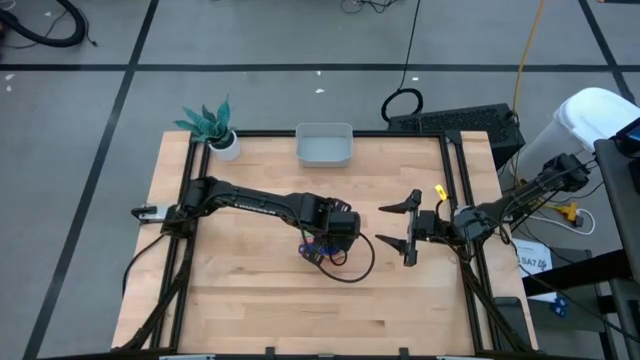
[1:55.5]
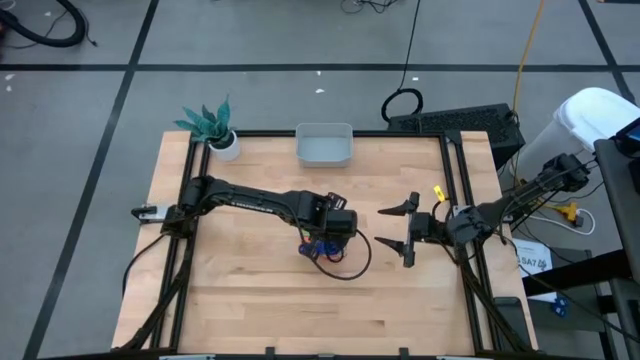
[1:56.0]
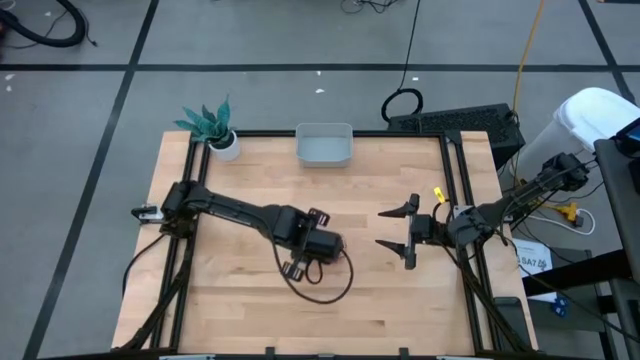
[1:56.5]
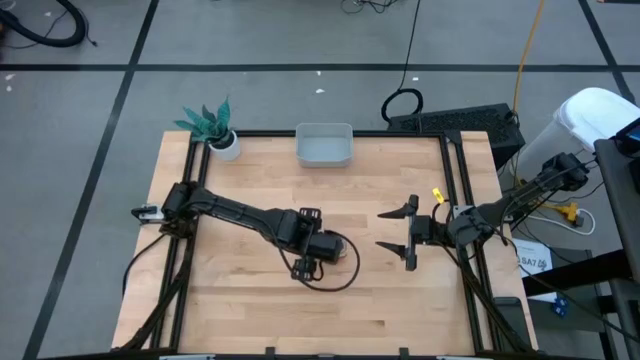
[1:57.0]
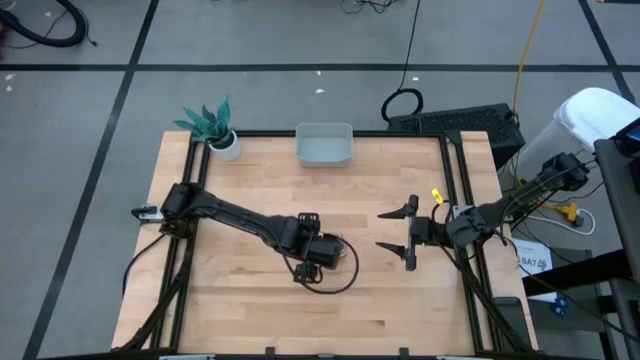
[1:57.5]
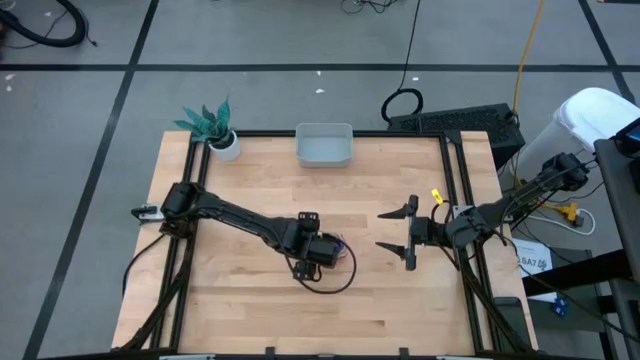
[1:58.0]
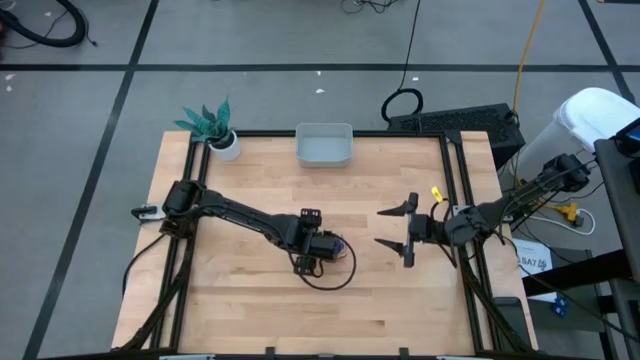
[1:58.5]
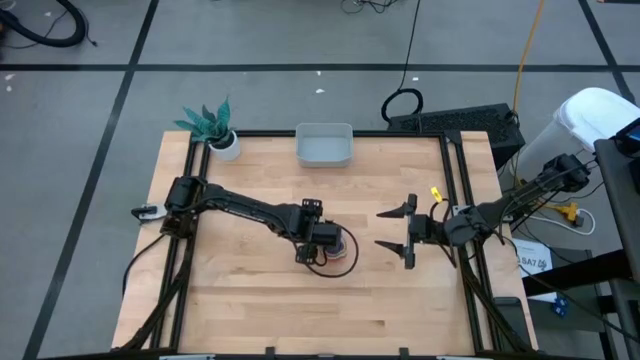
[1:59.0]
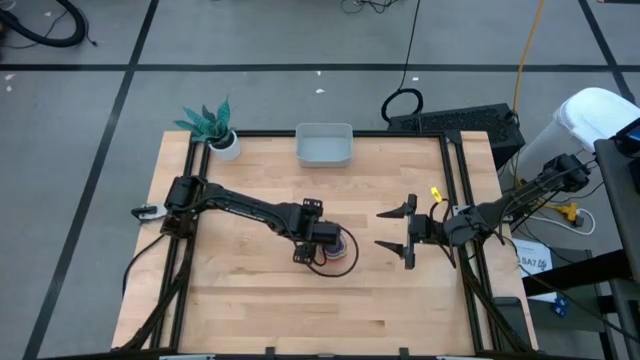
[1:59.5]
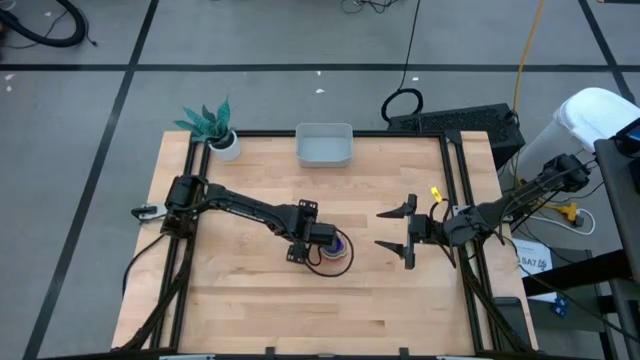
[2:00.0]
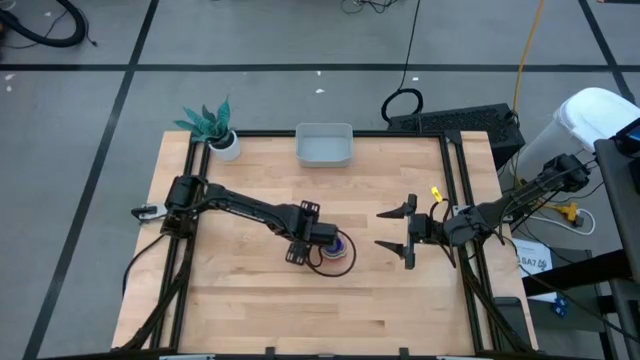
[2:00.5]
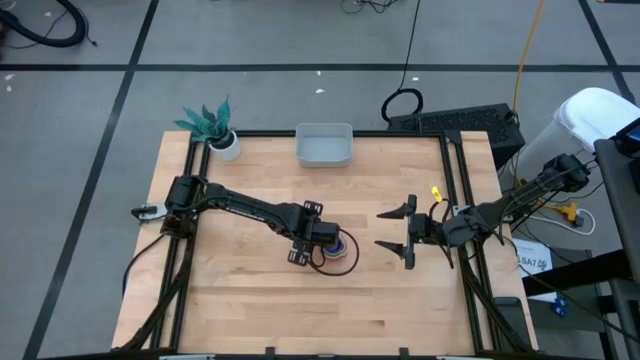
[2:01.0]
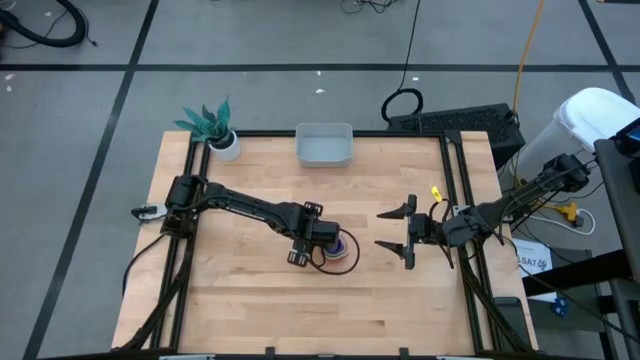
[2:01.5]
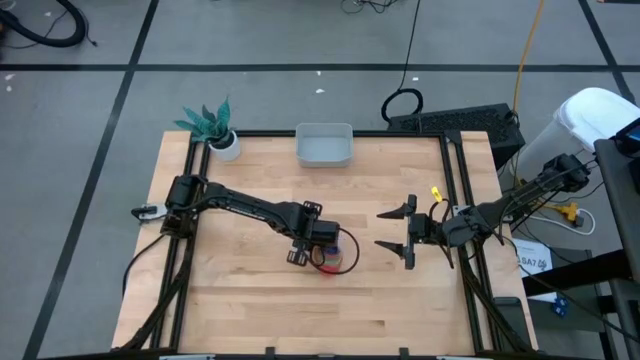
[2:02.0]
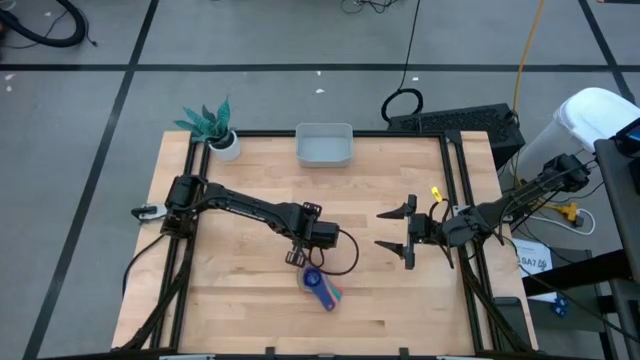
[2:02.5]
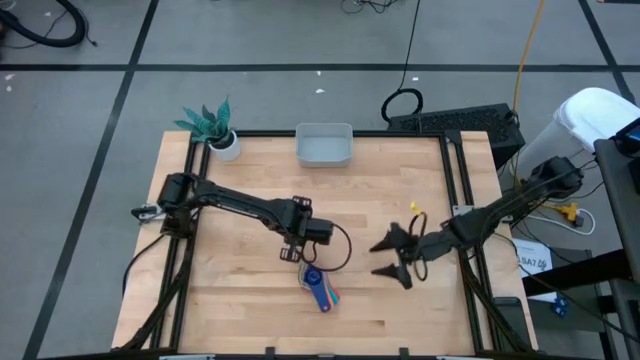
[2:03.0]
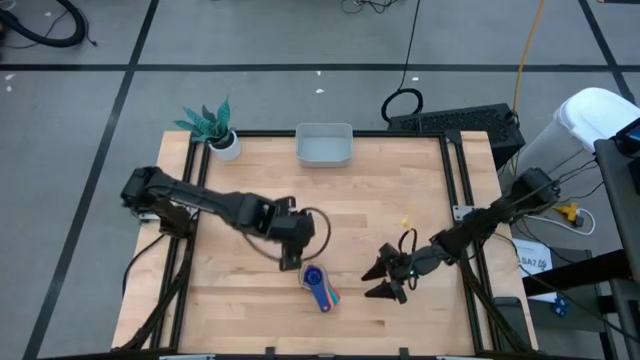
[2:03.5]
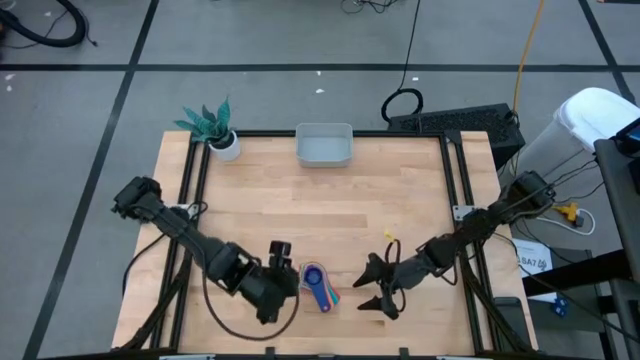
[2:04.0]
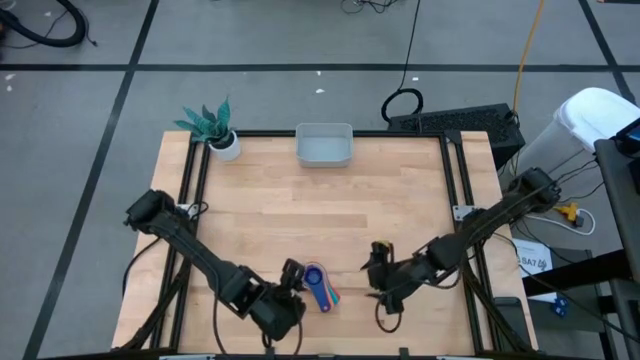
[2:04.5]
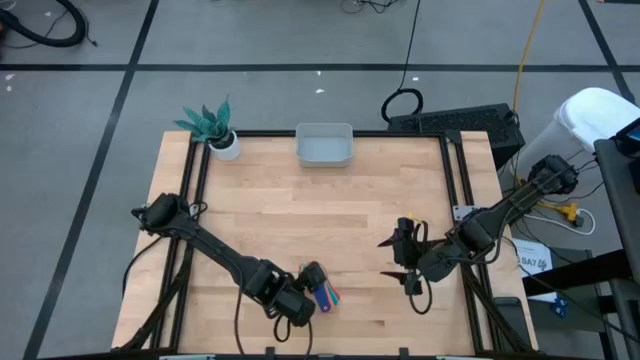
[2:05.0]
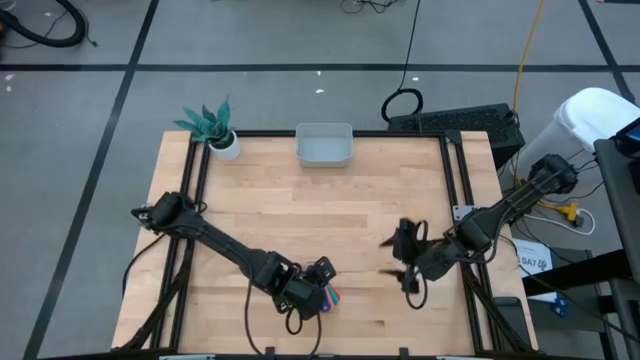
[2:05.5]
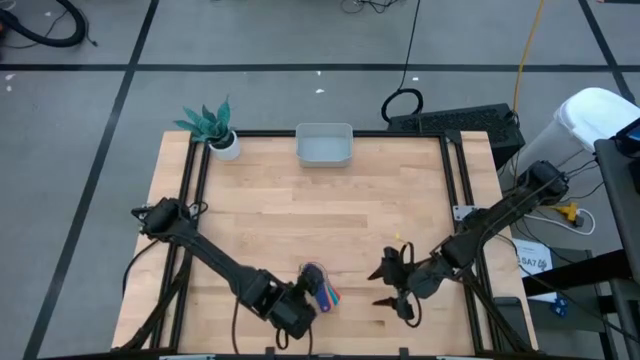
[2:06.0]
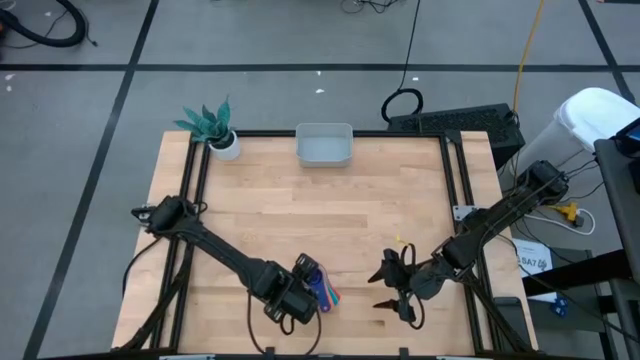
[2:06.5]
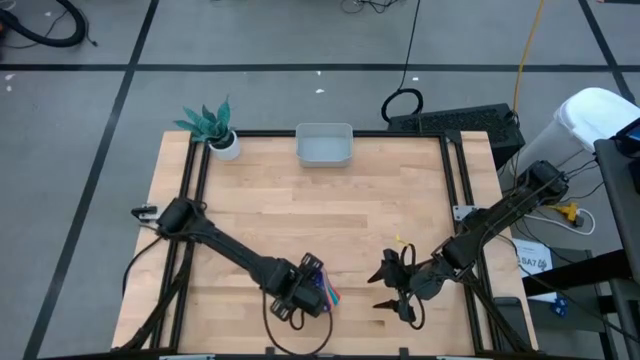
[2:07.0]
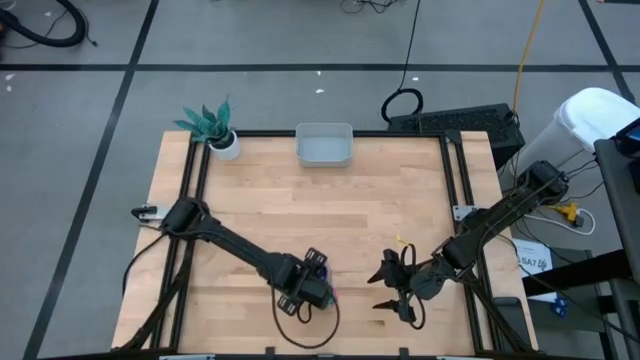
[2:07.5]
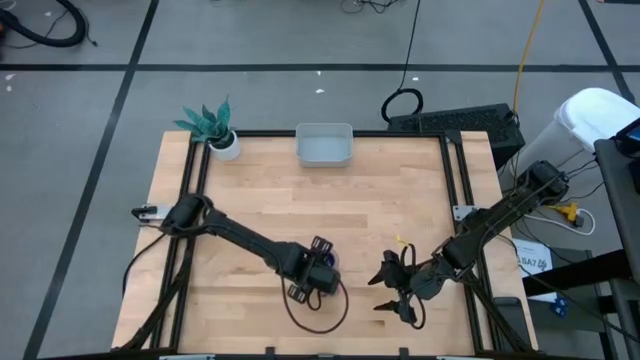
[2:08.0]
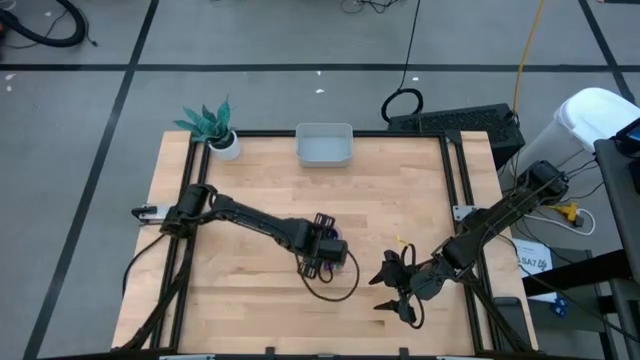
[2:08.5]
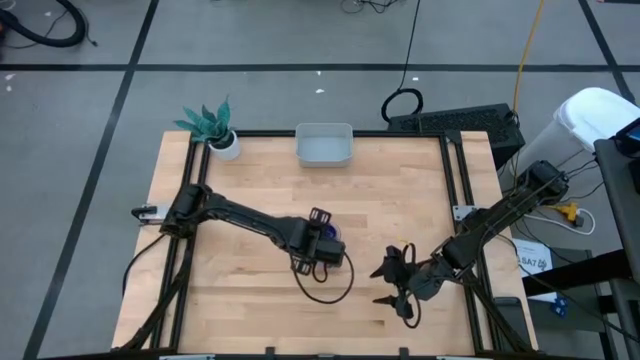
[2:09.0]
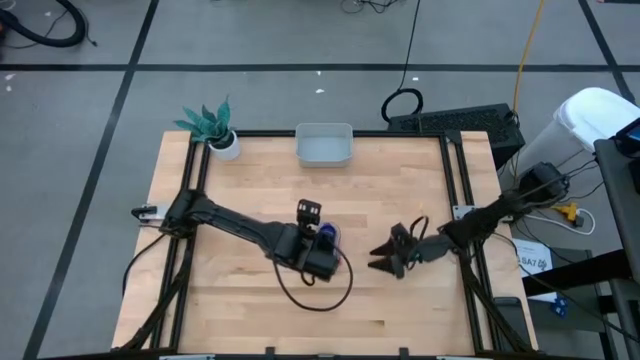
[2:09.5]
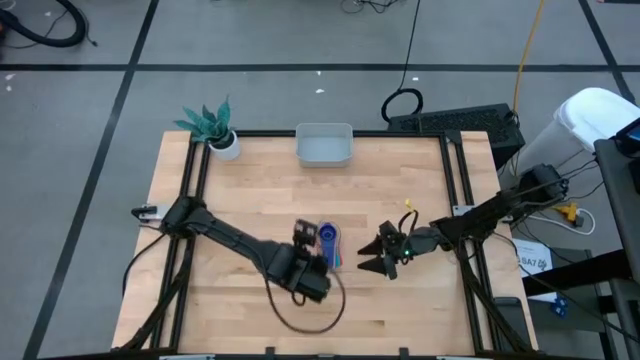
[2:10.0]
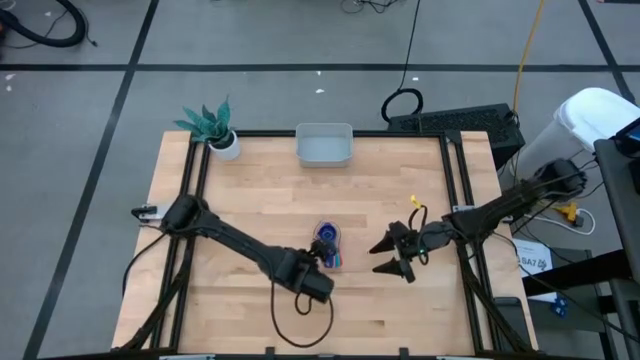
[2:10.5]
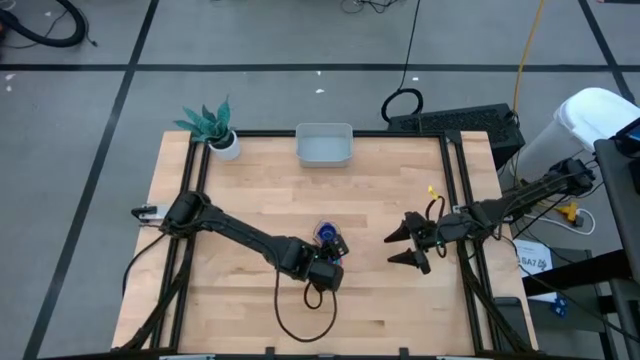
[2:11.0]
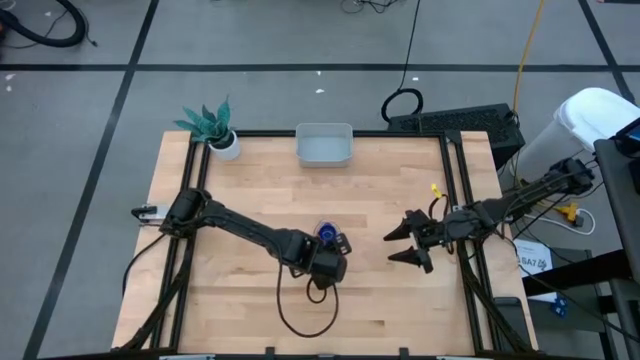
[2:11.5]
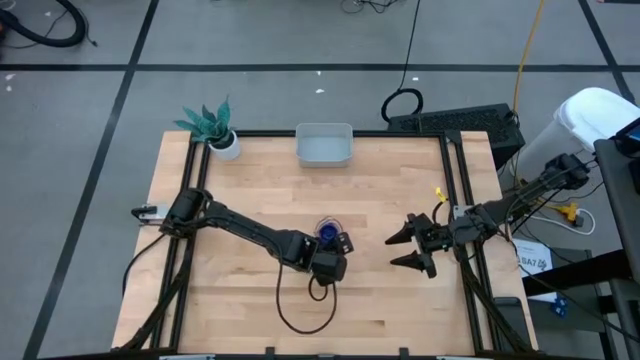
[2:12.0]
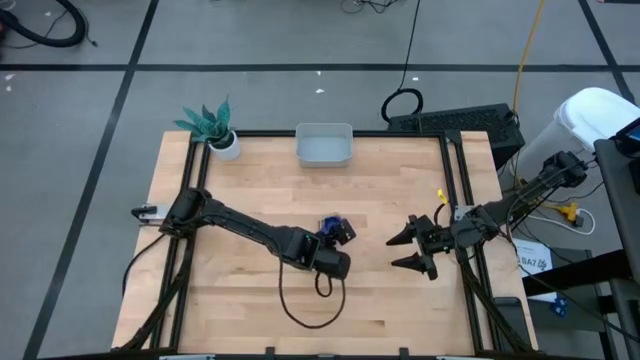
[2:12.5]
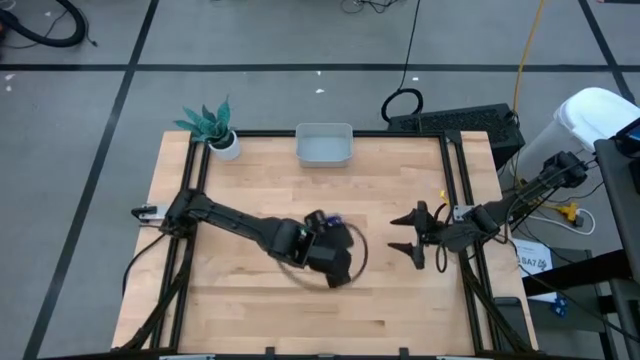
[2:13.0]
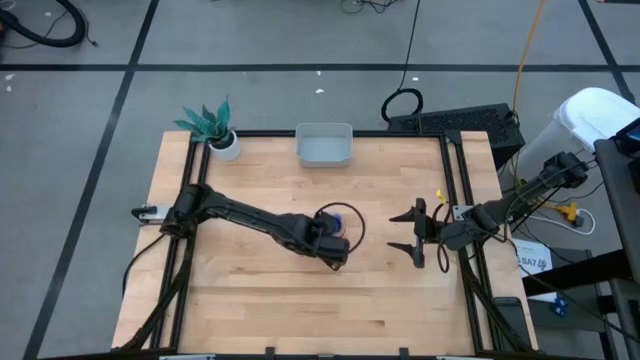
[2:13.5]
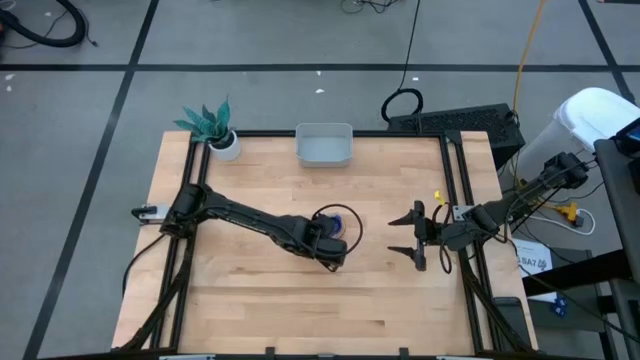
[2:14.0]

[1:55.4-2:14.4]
Task: Nest measuring cups in basket
Put the nested measuring cups into the gray bin

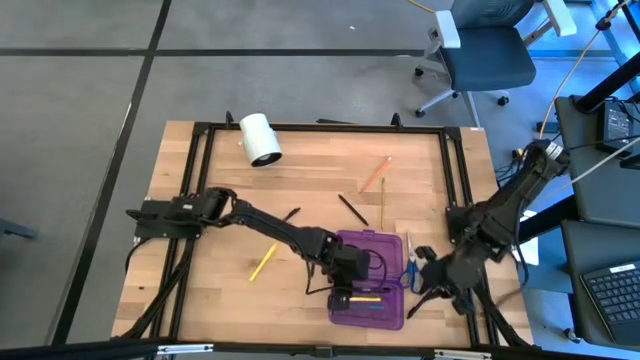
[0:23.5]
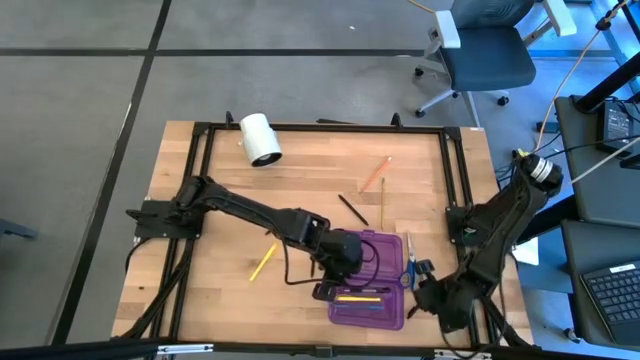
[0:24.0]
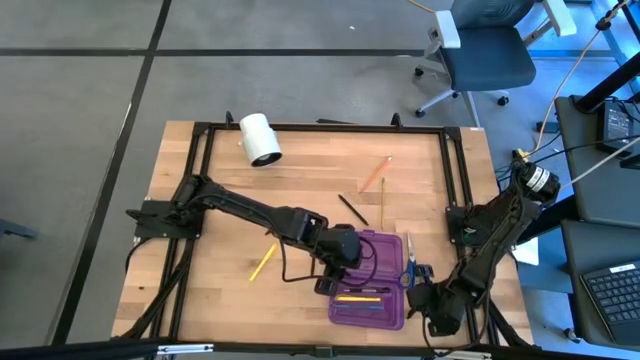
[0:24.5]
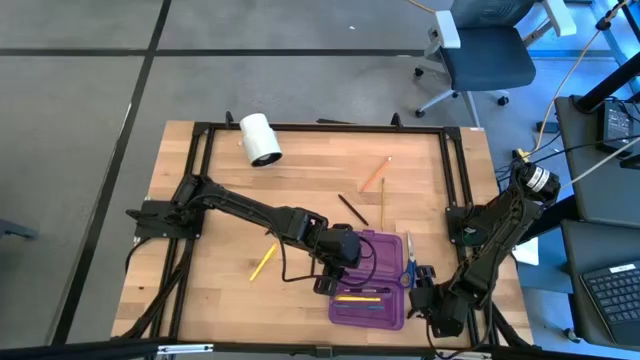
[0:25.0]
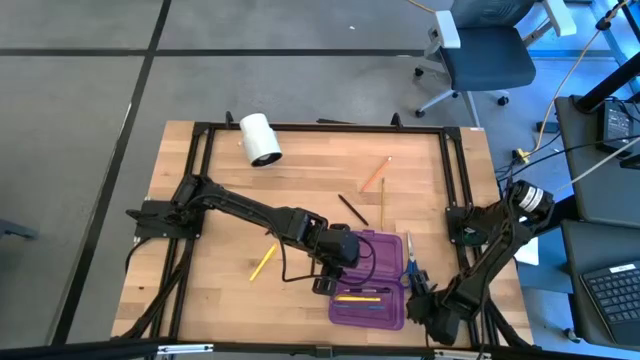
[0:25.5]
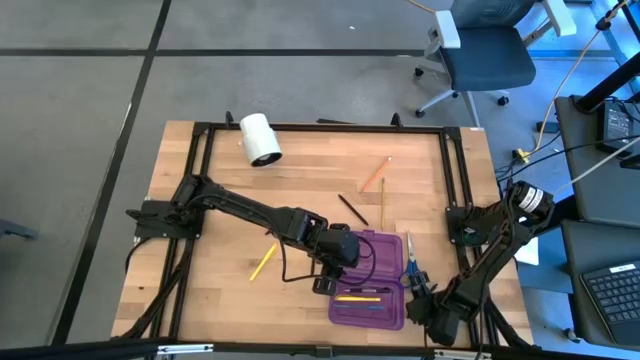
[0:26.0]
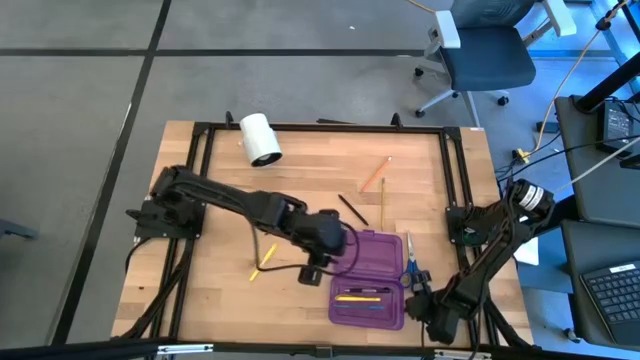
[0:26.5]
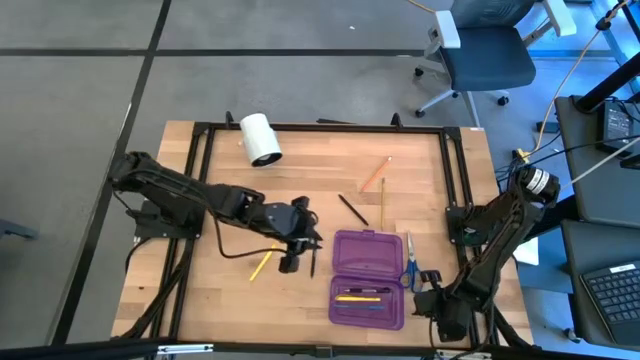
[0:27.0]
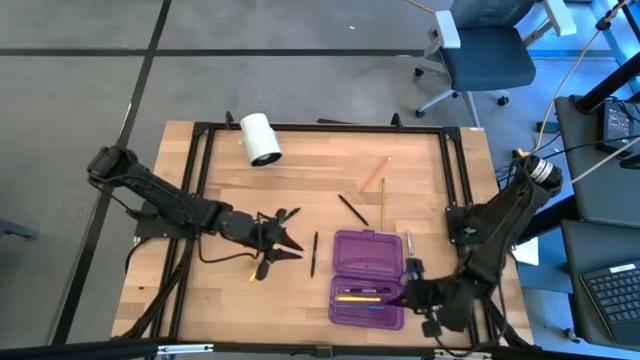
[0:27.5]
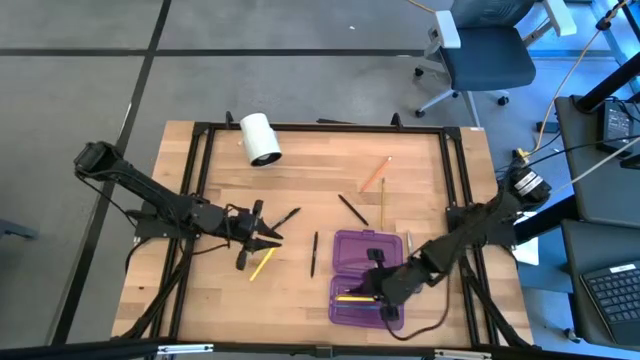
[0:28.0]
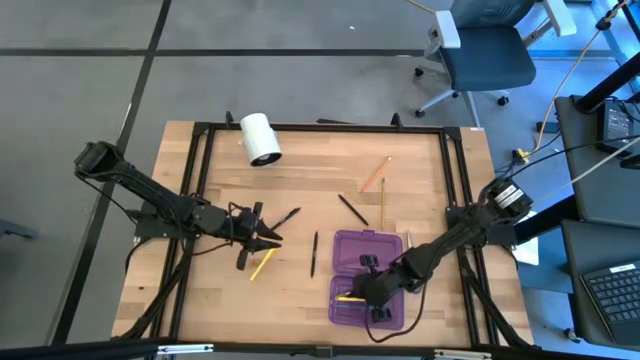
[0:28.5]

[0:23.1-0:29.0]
Task: Pick & place school supplies into a supply box
Put the black pen into the purple supply box
